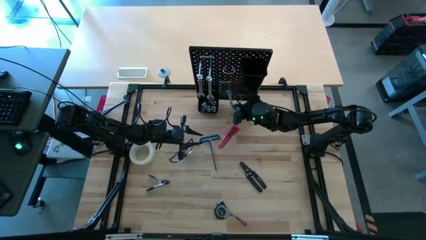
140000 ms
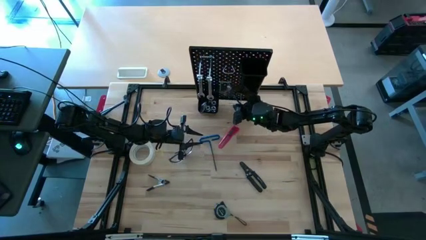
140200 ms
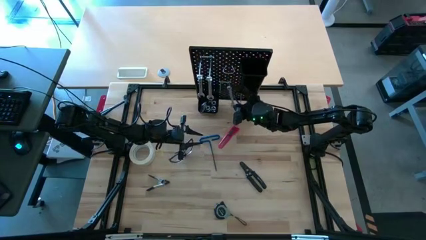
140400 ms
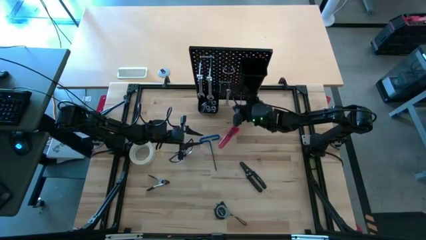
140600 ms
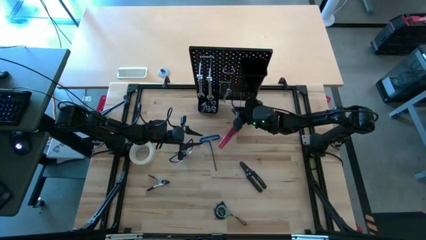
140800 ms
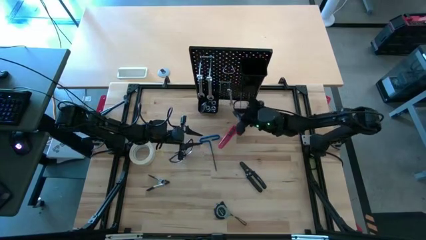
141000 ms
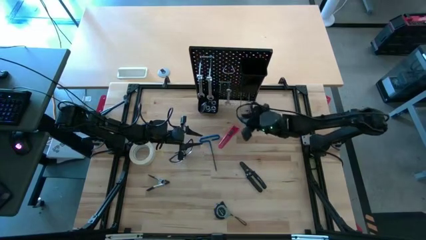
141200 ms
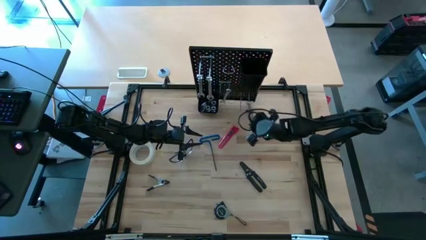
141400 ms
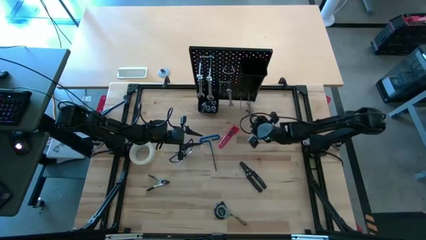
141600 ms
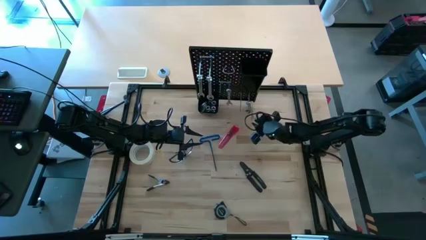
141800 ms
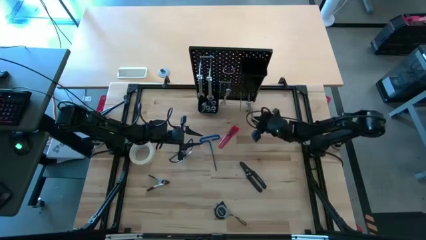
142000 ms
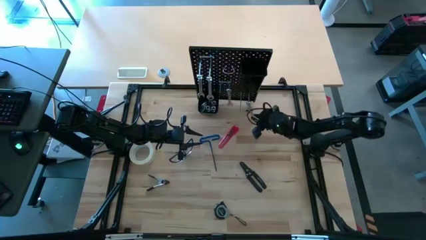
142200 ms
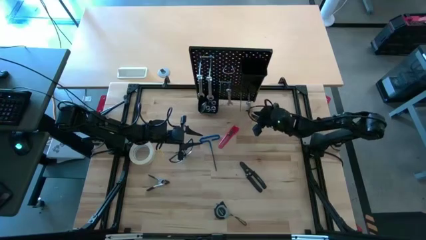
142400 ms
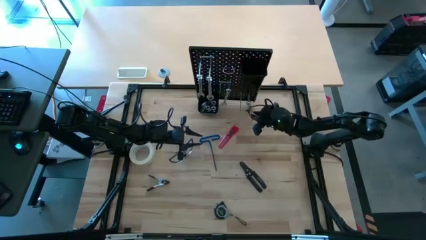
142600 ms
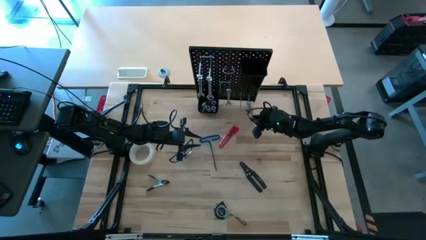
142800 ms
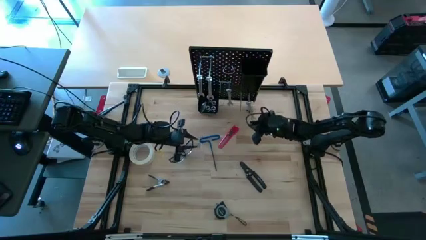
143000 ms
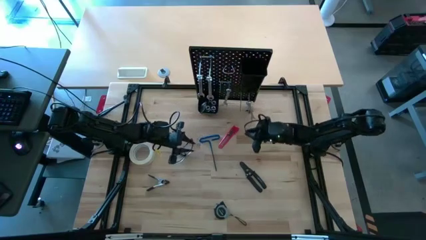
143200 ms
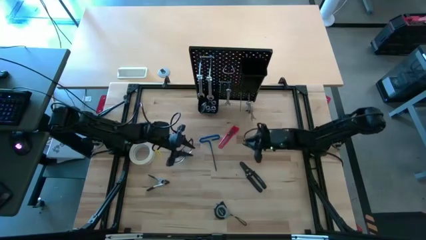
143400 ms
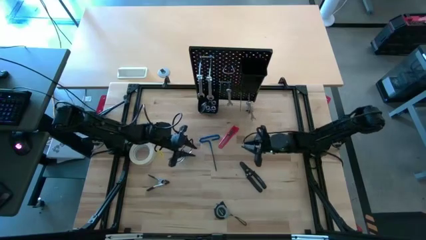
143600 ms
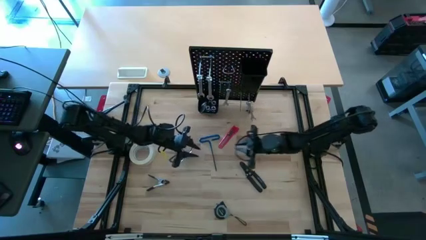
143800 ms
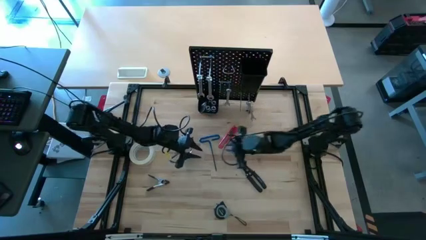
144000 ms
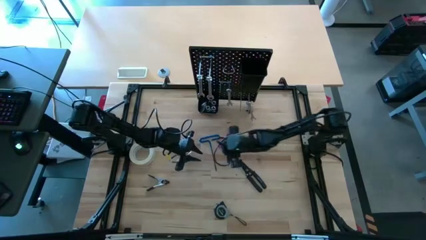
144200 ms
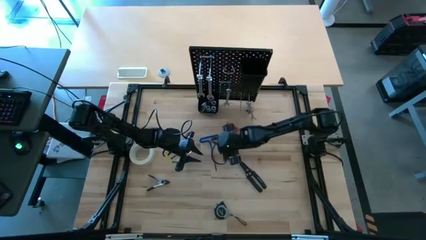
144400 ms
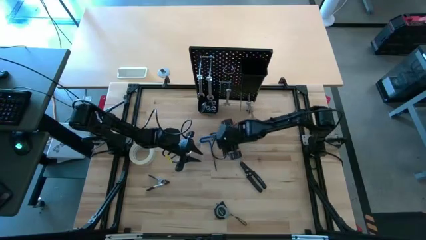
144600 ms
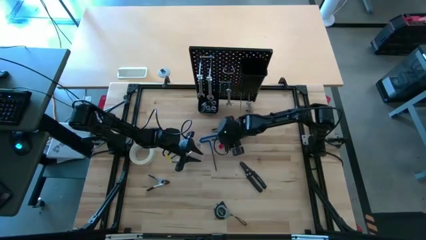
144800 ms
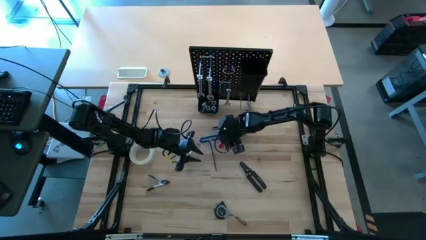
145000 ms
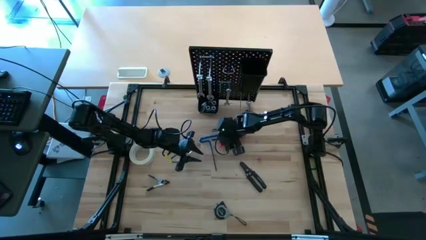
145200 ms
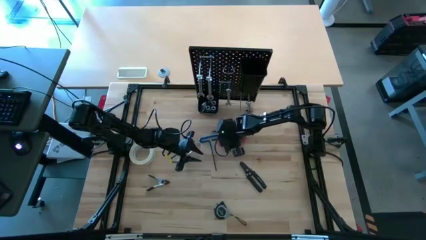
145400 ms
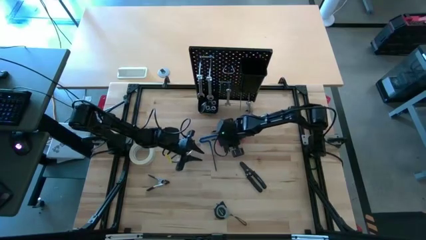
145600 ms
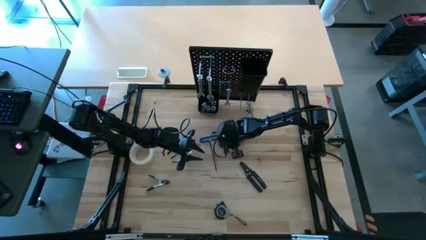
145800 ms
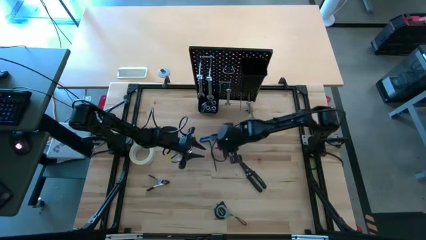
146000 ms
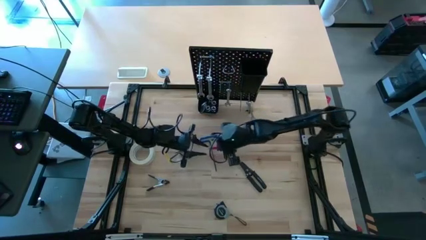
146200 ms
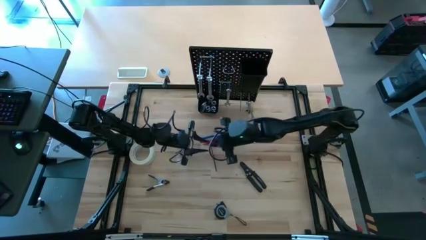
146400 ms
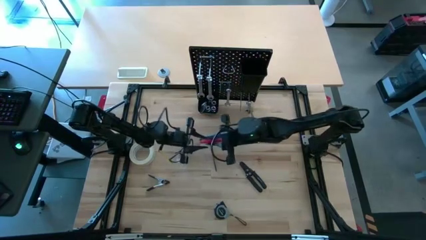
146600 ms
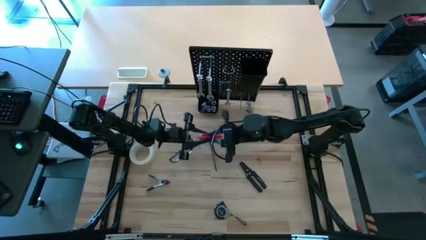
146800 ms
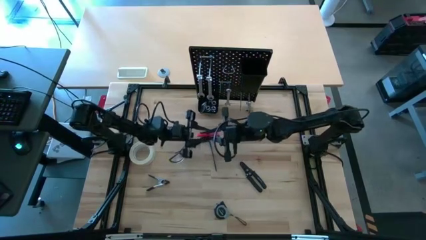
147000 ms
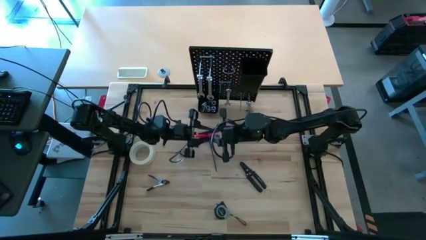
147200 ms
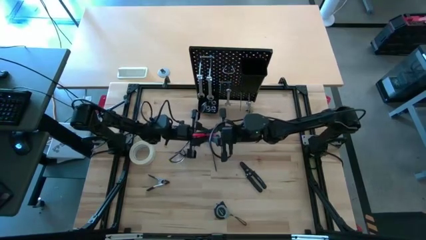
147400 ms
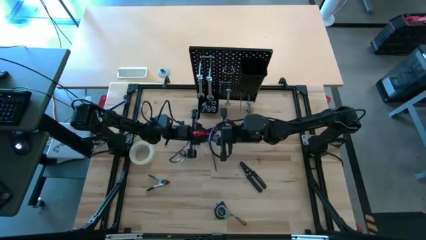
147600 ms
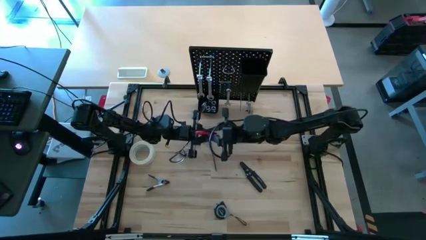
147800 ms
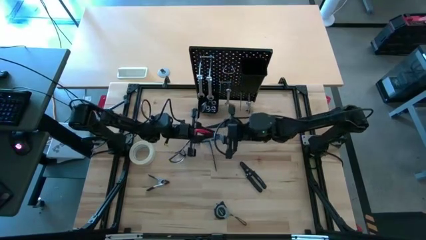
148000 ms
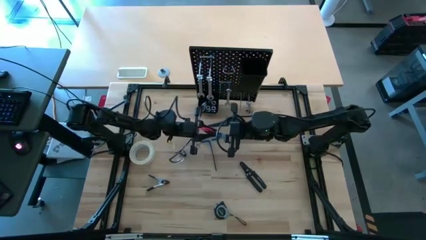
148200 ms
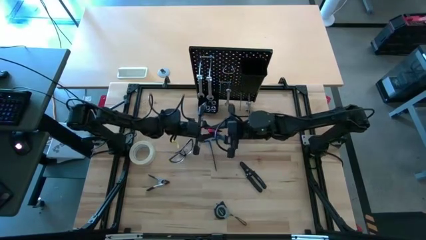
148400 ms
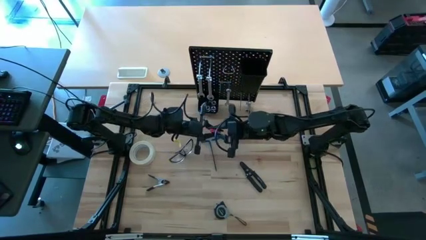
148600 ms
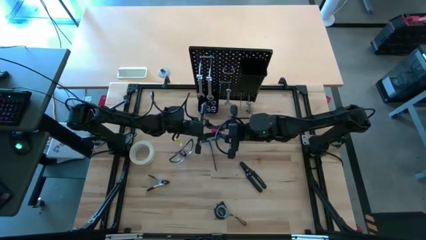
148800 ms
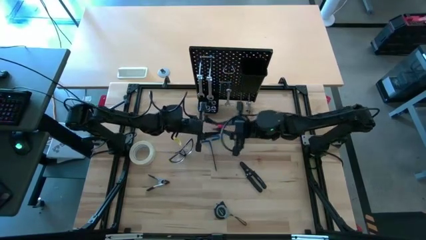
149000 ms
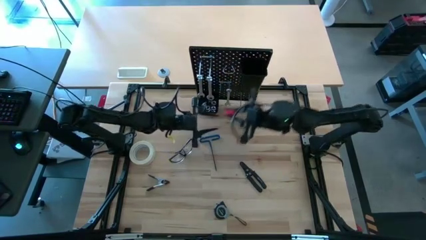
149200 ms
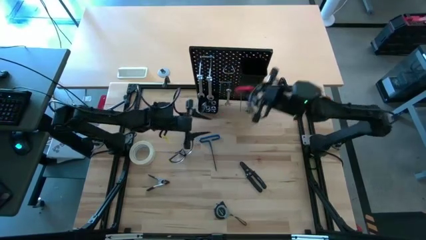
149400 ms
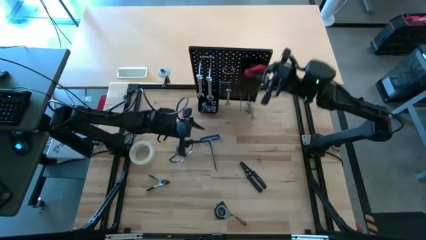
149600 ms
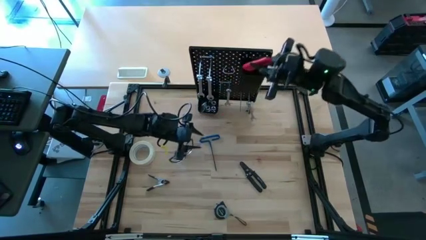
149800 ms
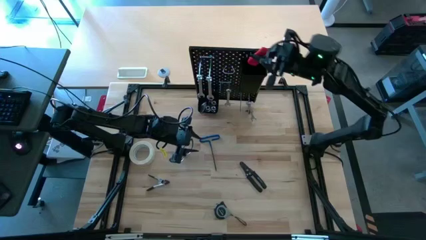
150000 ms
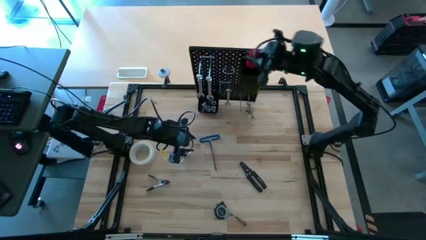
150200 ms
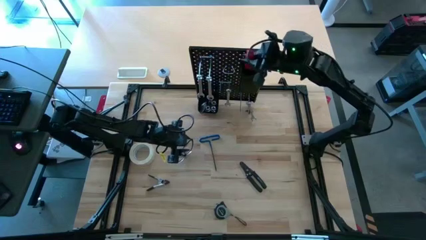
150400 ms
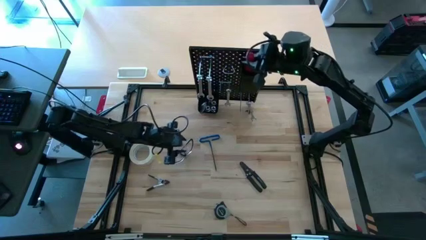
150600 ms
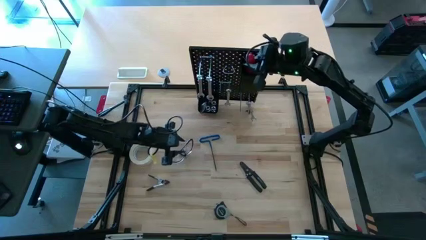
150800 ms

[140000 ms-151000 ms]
Task: Hang tools onto peg board
Put the utility knife blade into the top black bin on the peg board

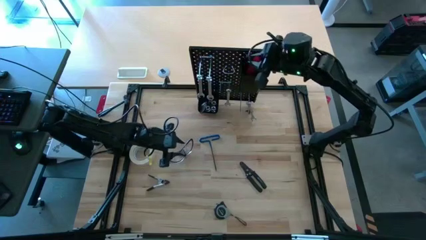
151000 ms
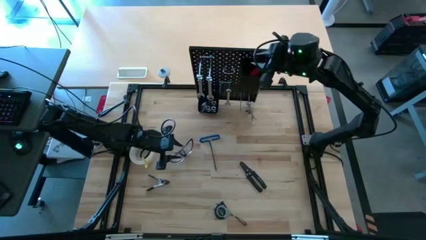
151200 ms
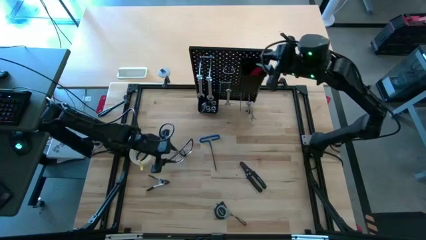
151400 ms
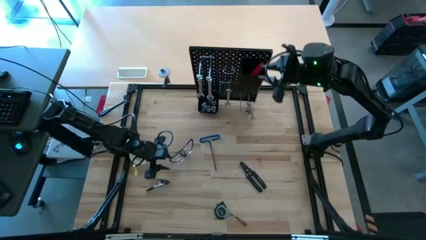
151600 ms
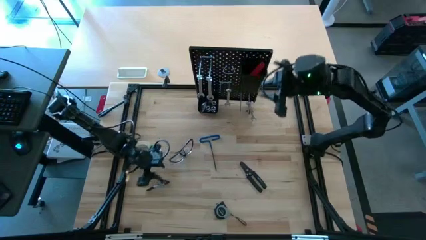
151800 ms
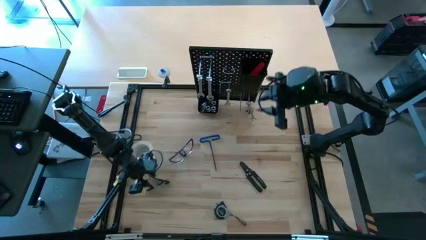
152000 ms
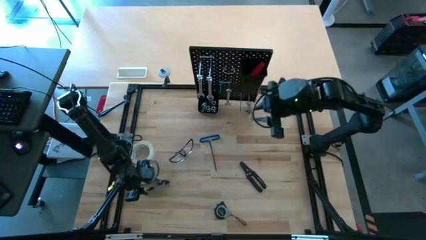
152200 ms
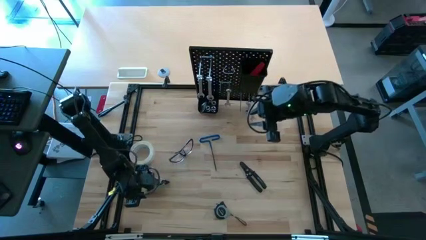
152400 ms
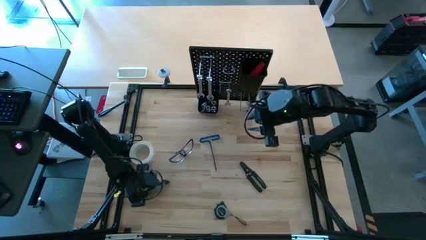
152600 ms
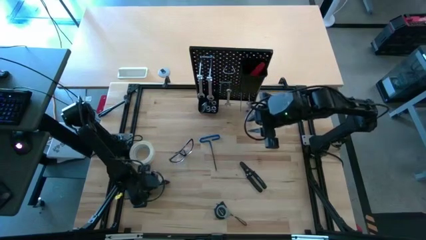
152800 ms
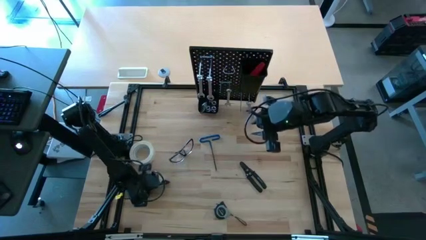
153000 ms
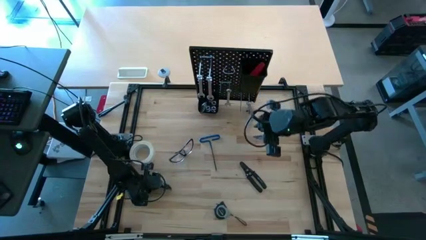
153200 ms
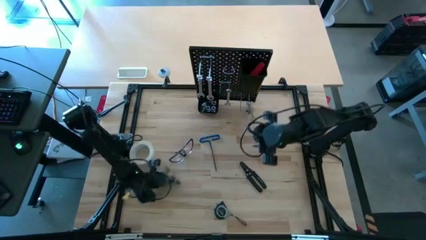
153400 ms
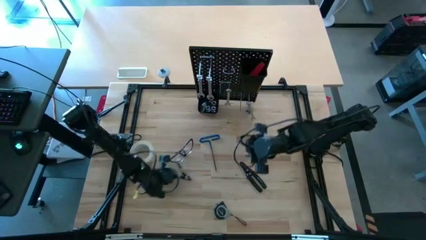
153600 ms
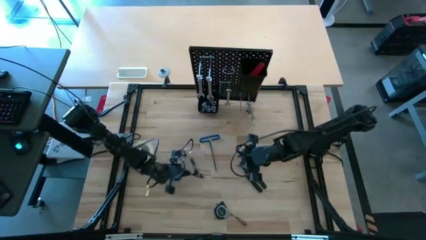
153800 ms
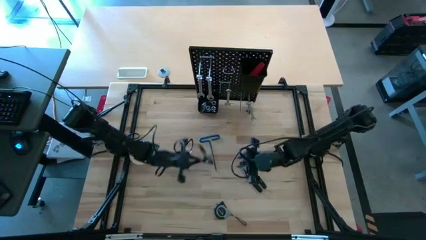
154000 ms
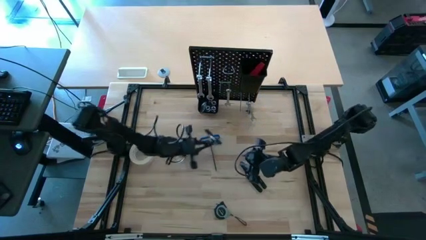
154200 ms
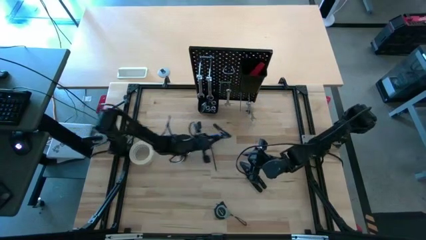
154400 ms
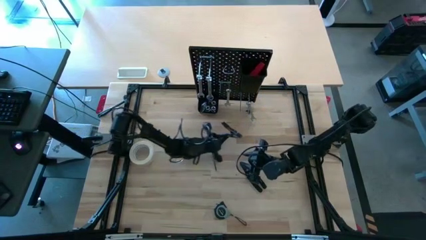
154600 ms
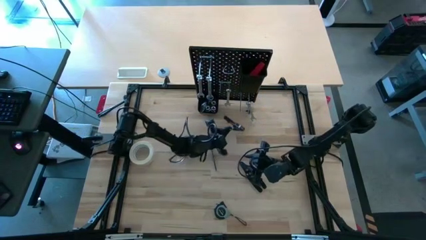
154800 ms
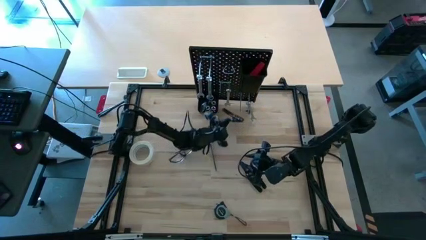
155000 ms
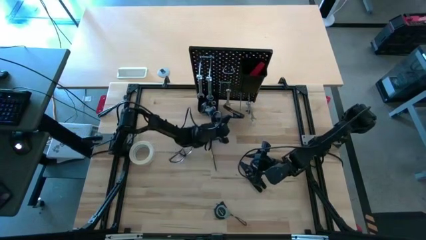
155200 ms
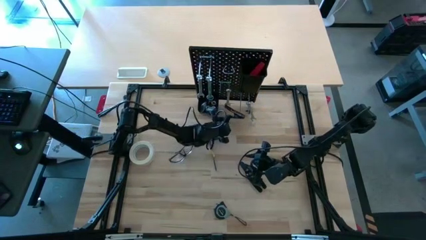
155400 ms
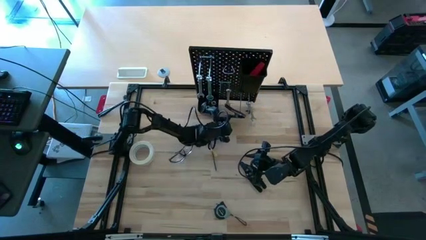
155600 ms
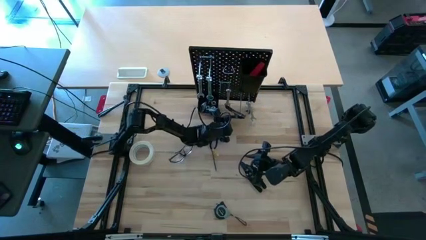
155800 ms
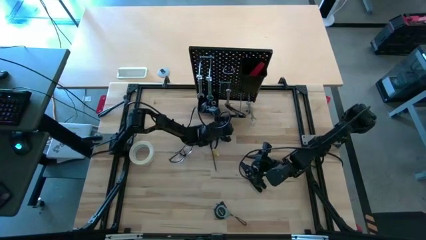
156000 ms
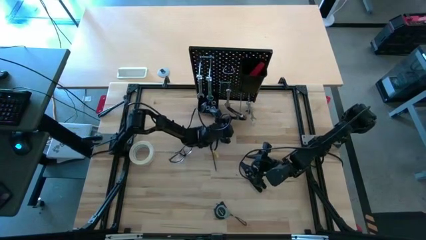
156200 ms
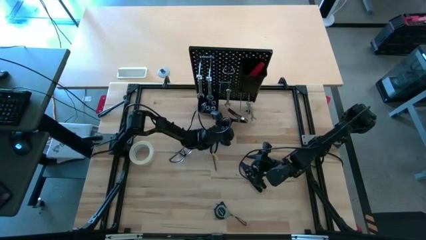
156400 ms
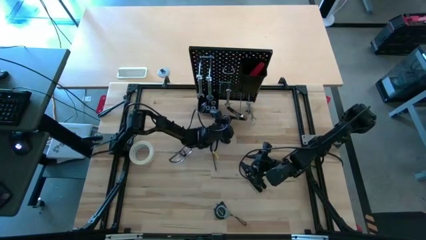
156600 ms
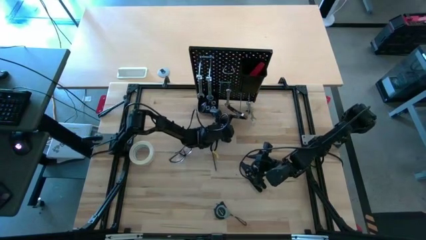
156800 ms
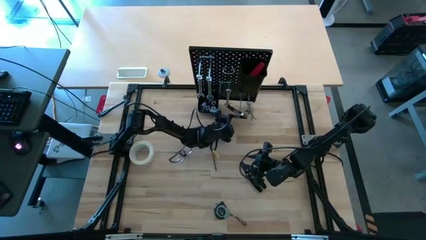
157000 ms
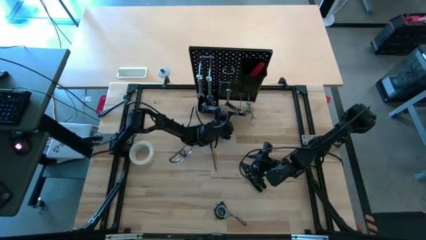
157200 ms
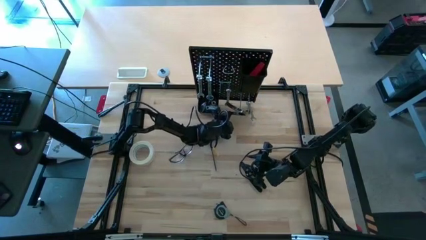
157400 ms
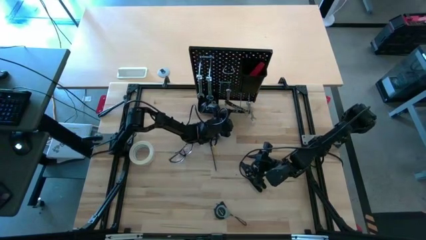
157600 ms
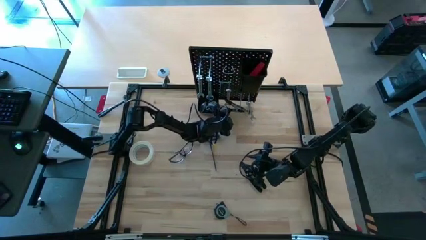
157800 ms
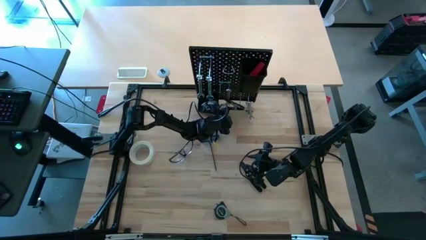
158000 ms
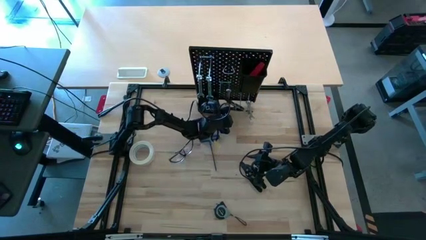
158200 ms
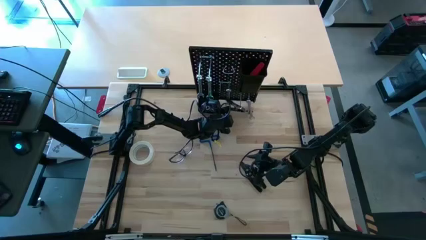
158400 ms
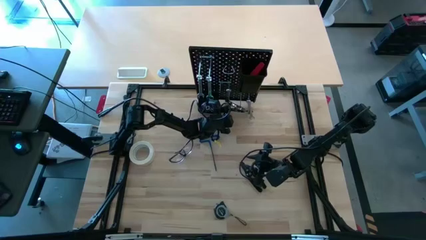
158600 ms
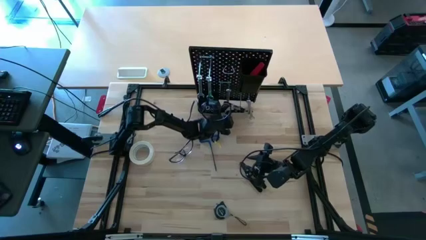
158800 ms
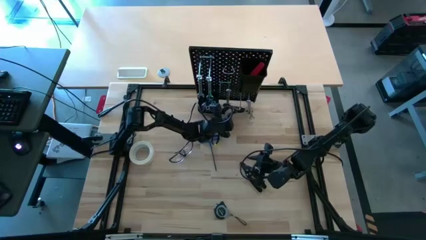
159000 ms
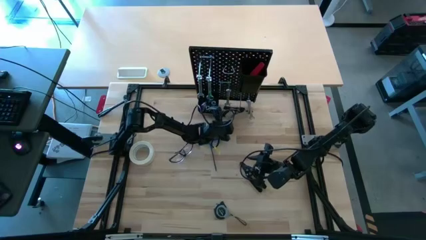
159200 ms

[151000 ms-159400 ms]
Hang the spring clamp onto the peg board
